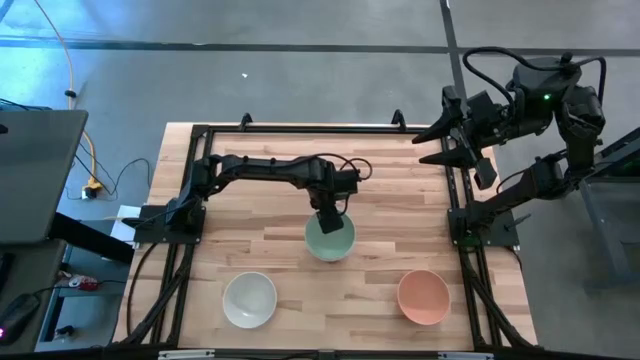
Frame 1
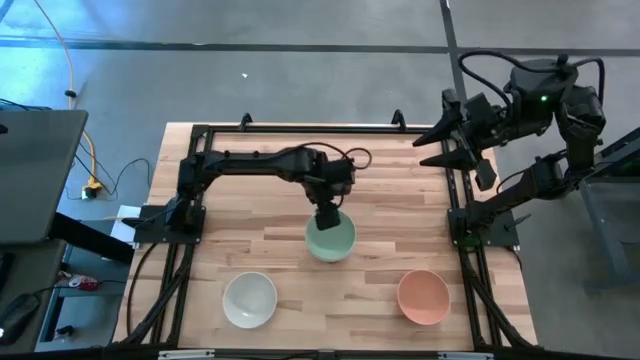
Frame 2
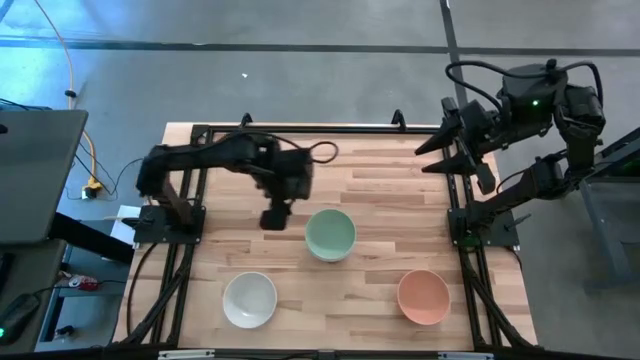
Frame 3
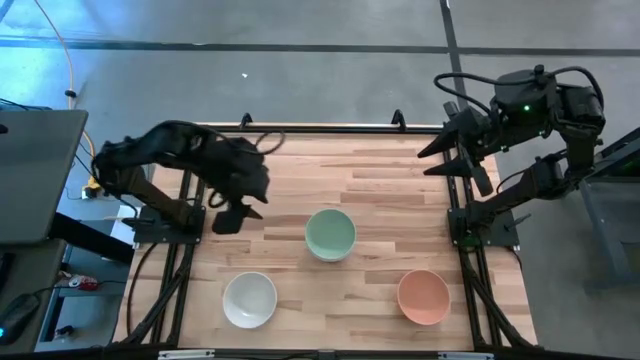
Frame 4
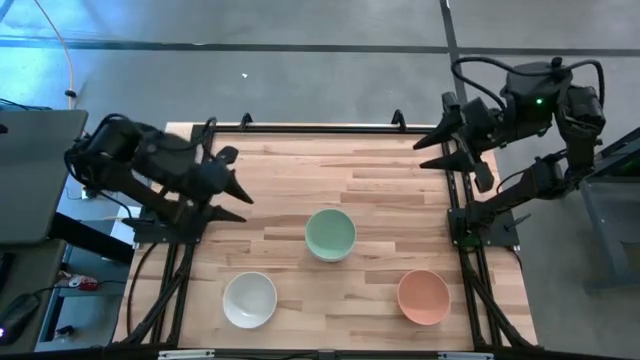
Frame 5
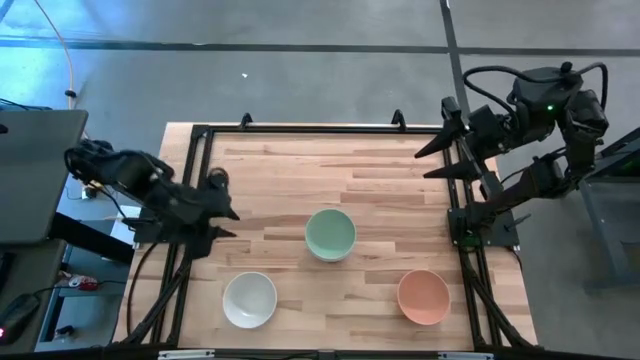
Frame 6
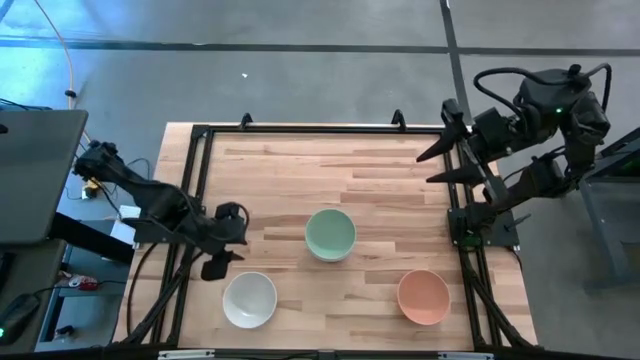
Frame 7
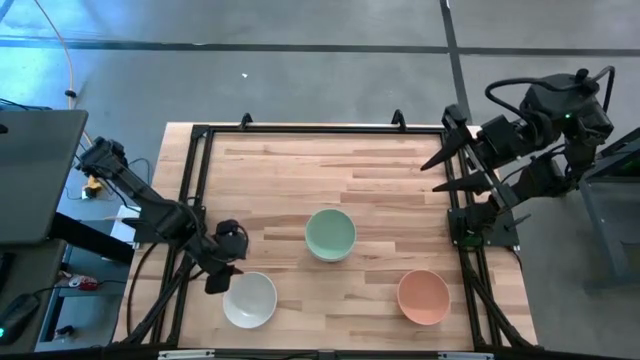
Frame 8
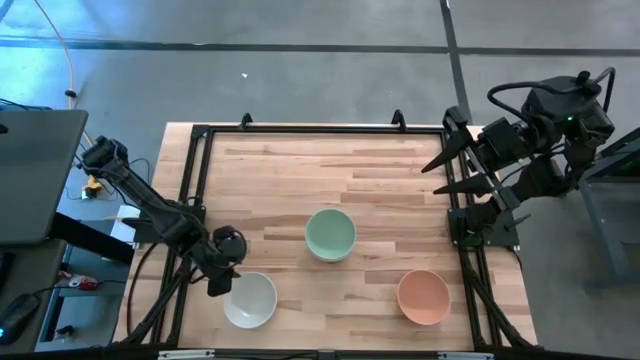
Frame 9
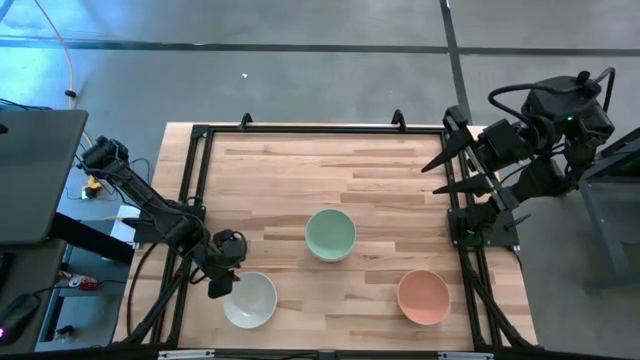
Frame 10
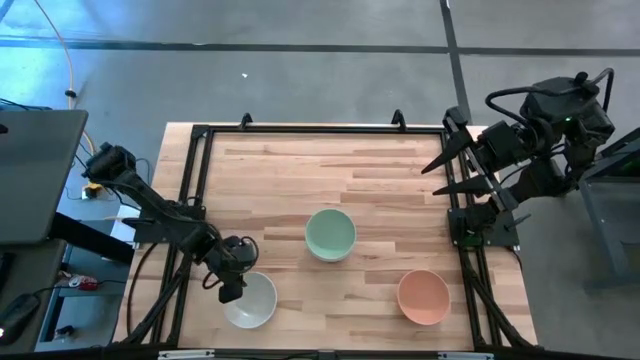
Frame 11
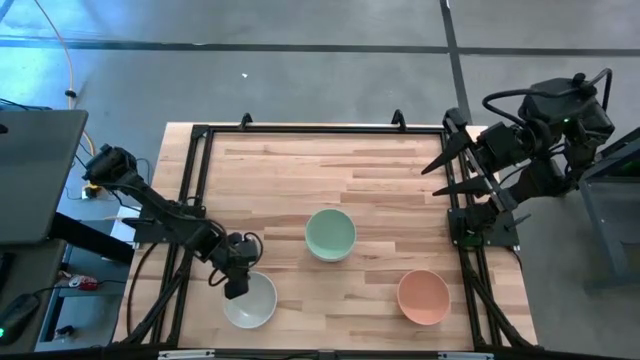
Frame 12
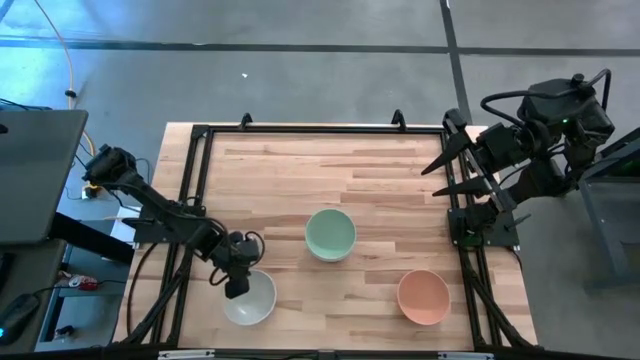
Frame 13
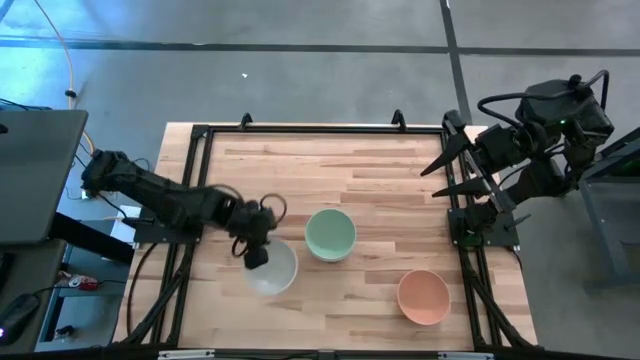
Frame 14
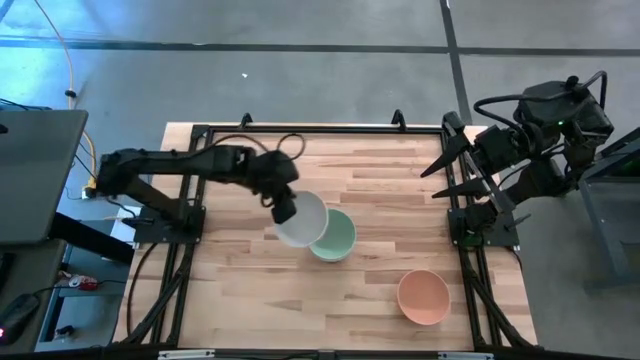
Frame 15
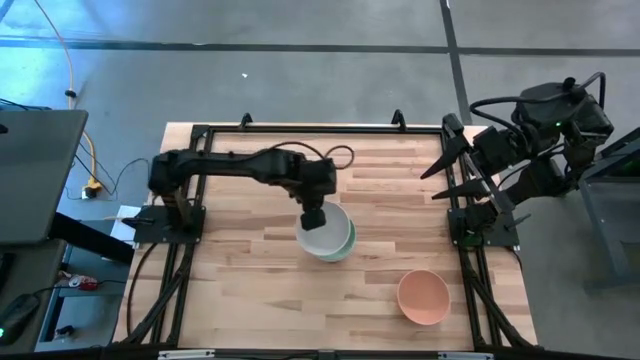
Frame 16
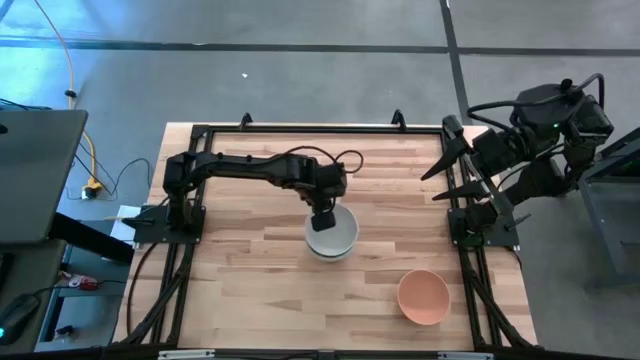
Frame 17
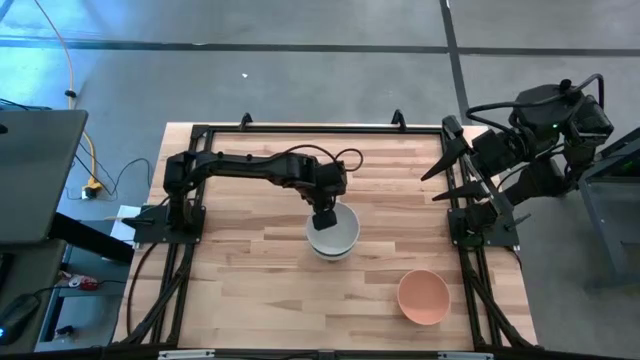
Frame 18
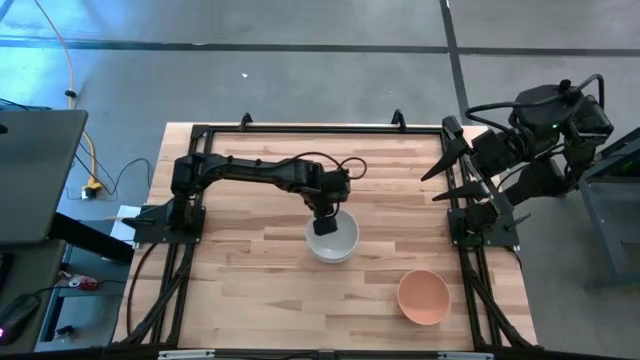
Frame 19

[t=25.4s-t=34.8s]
Task: Nest bowls inside each other
Stack the white bowl on the light green bowl

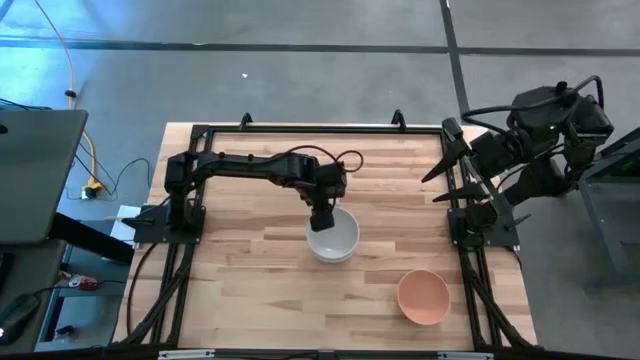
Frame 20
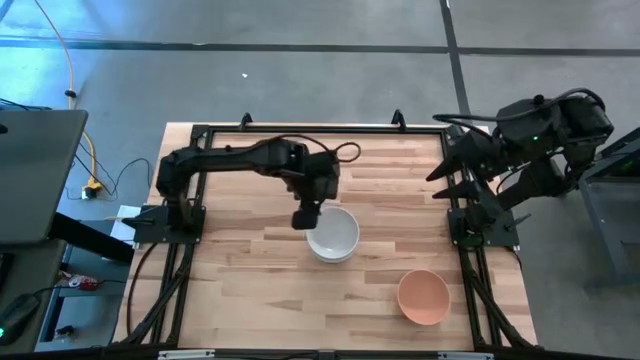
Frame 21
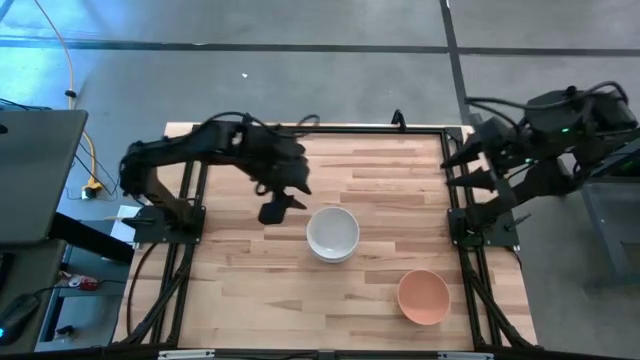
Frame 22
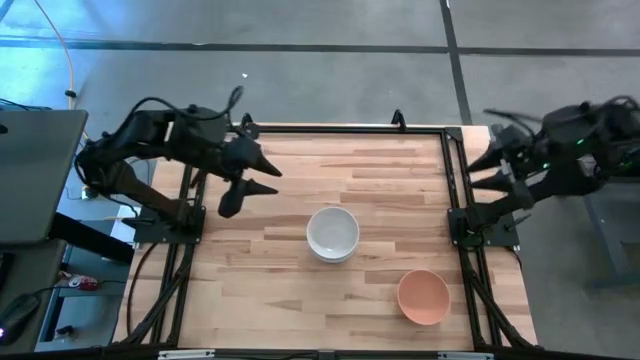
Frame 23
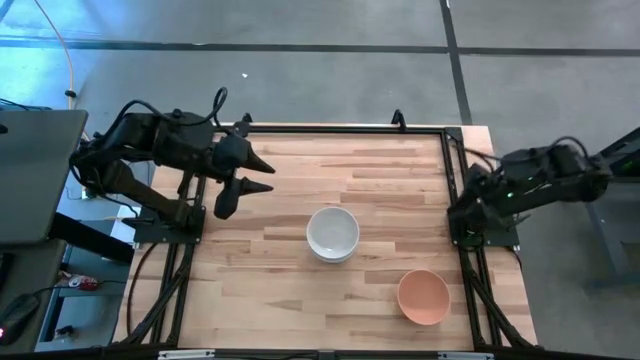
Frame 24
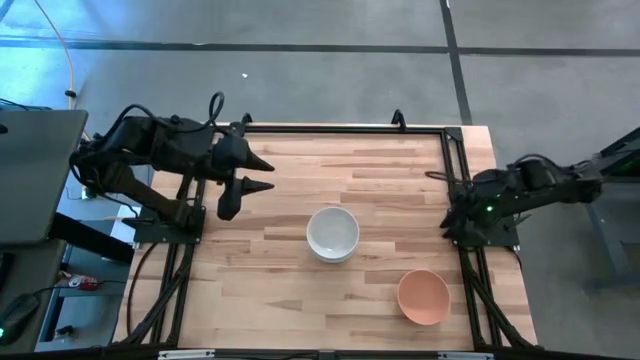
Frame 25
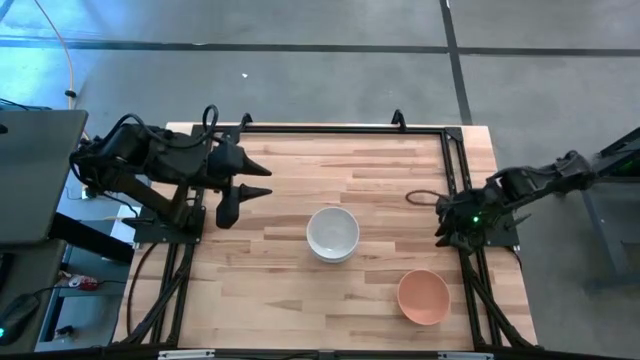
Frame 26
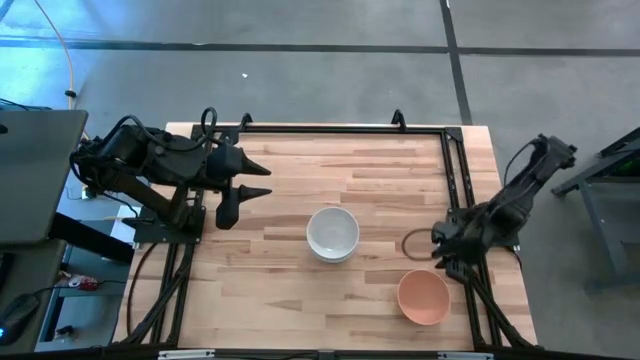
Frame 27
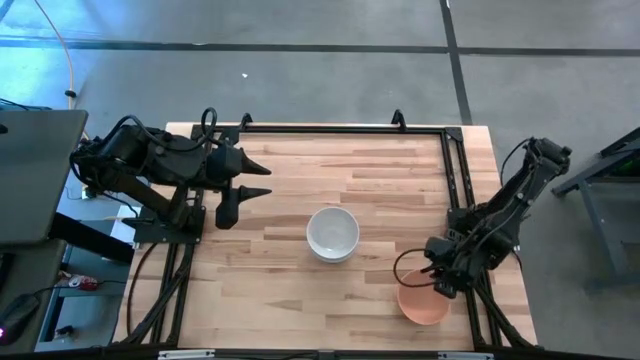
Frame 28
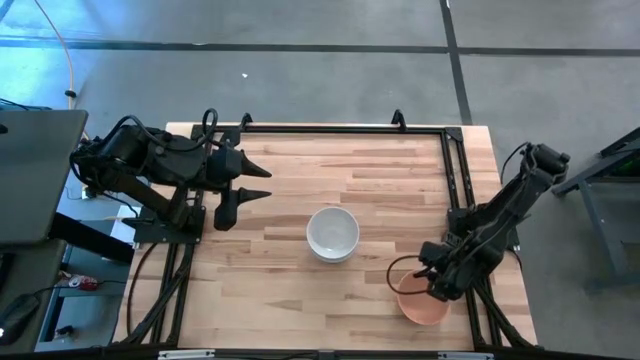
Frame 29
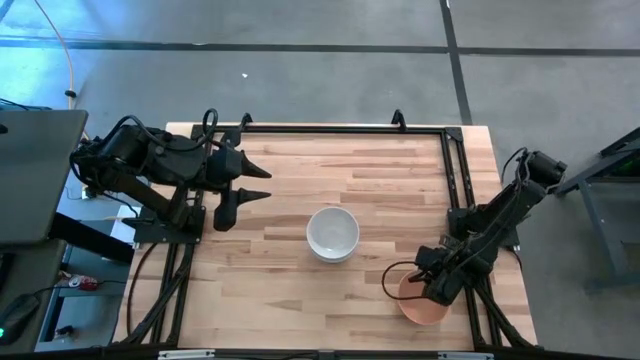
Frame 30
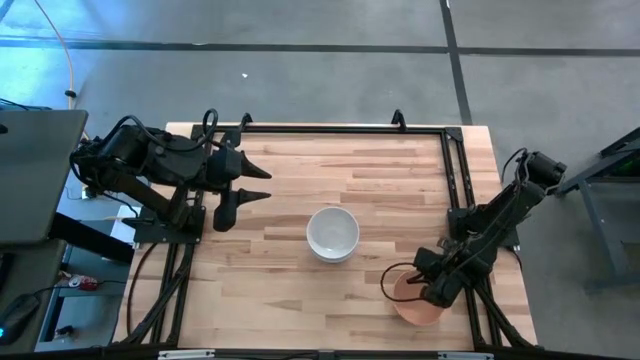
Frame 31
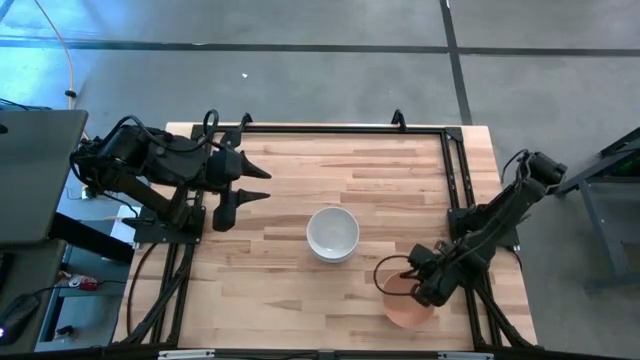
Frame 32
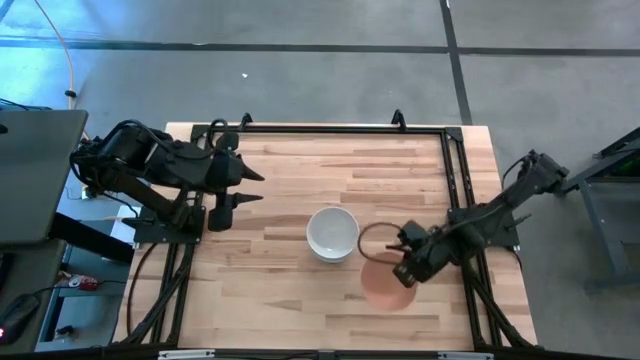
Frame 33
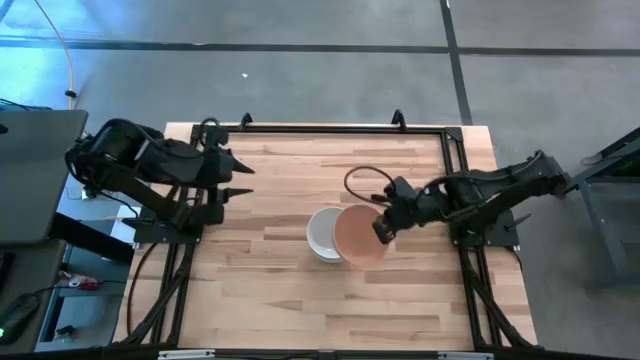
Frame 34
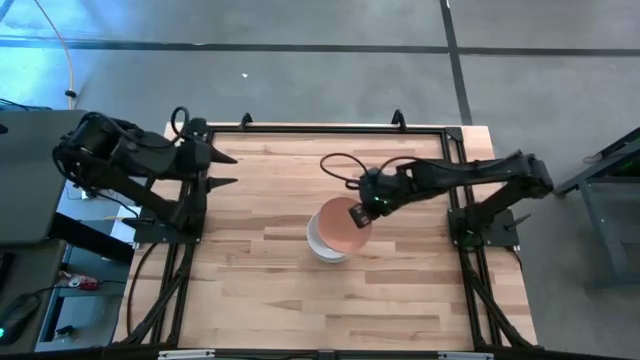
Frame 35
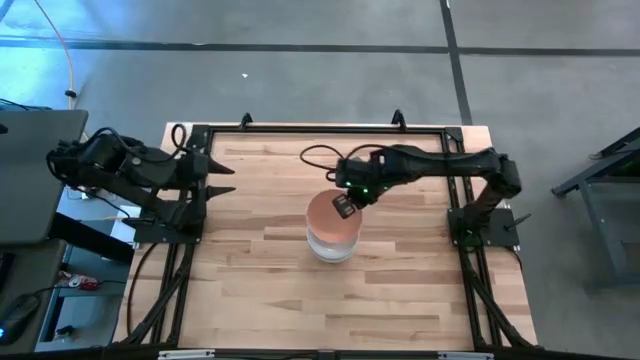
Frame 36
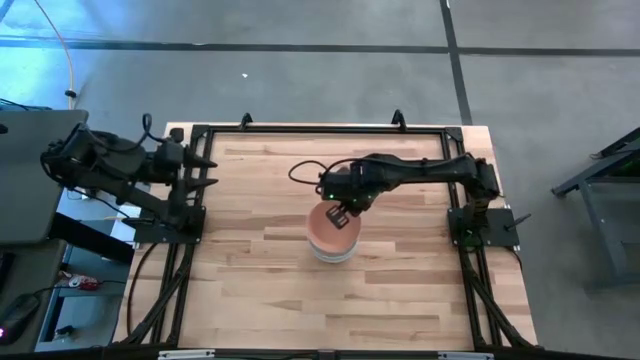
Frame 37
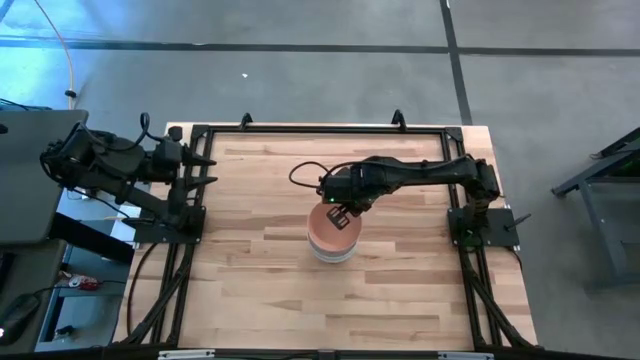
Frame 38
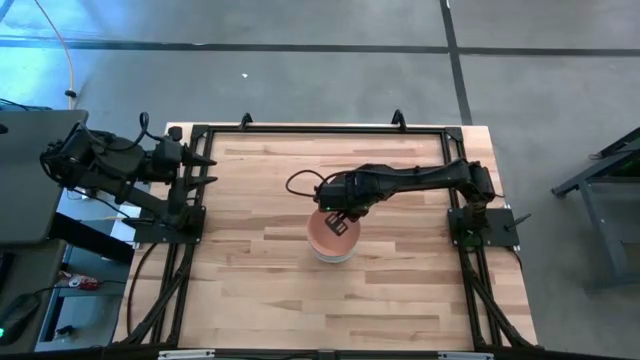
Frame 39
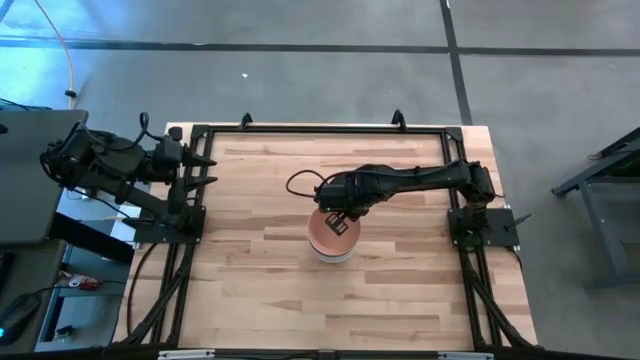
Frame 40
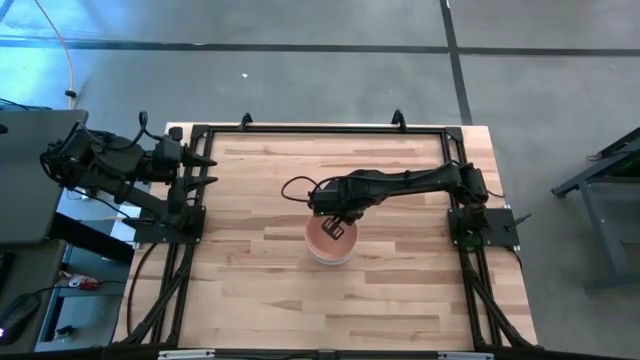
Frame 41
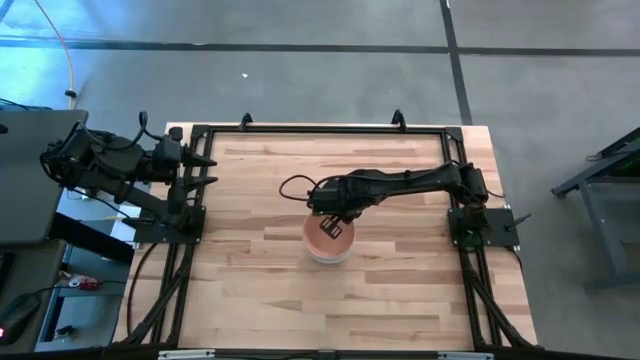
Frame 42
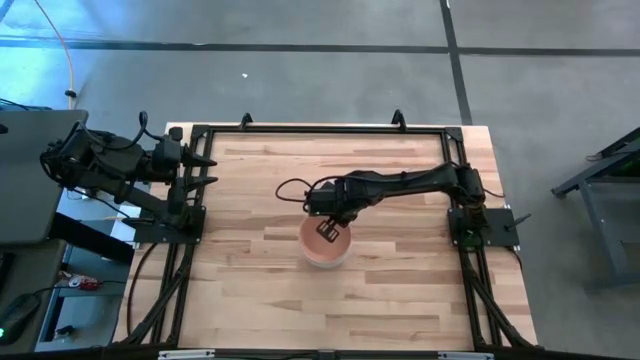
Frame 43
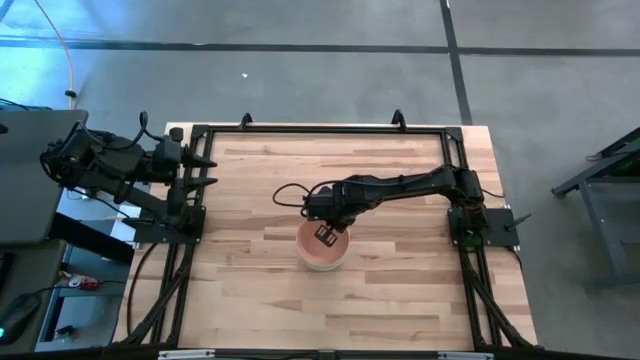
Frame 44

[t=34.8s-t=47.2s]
Stack the orange bowl on the white bowl
